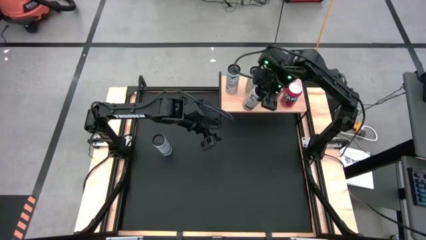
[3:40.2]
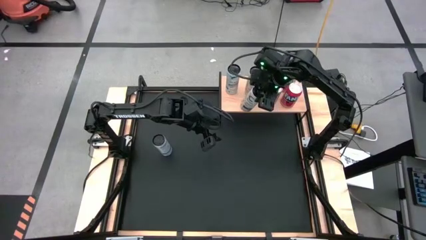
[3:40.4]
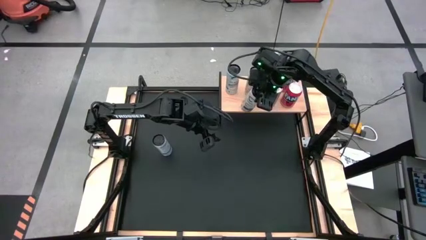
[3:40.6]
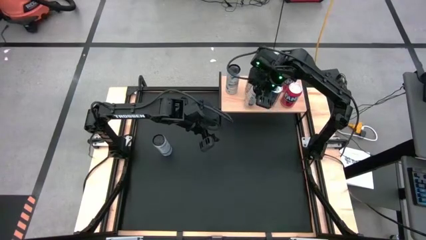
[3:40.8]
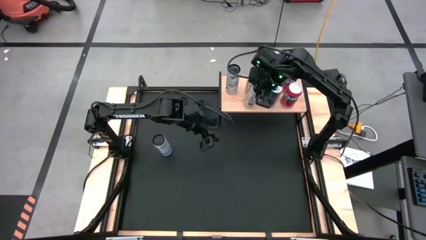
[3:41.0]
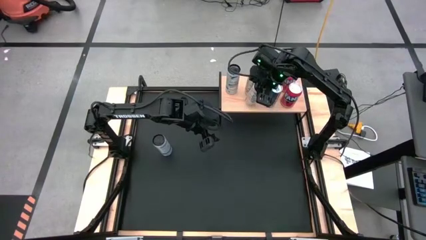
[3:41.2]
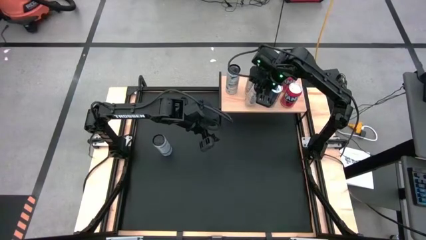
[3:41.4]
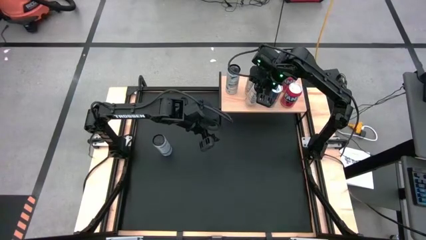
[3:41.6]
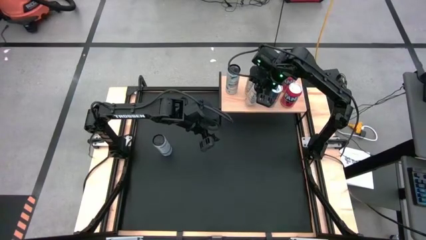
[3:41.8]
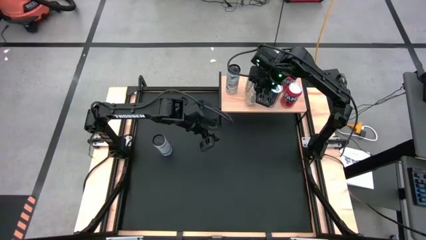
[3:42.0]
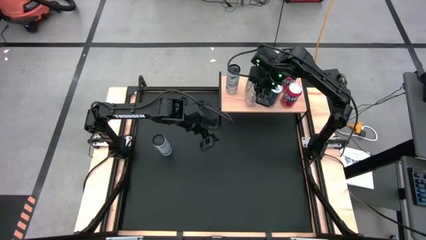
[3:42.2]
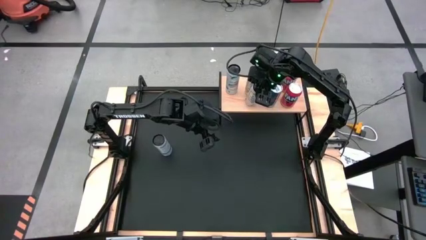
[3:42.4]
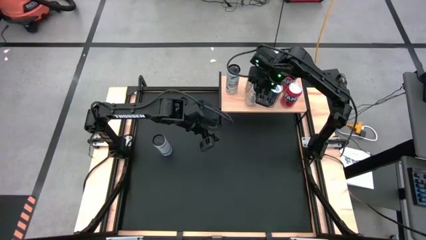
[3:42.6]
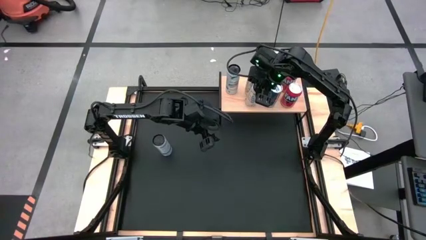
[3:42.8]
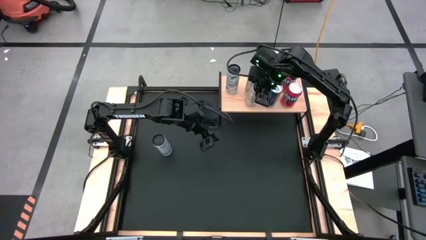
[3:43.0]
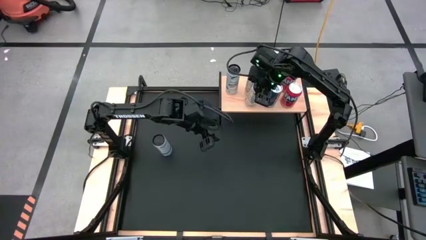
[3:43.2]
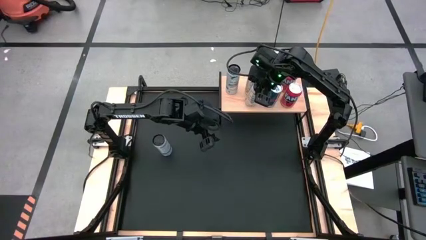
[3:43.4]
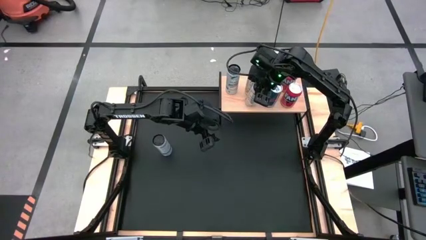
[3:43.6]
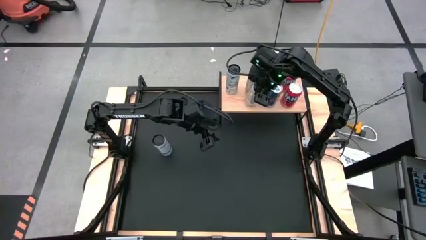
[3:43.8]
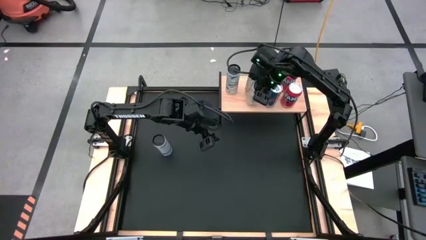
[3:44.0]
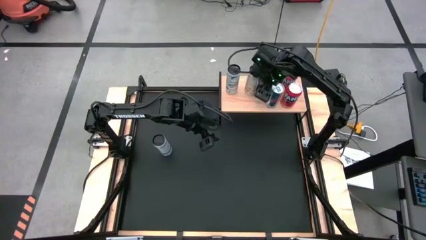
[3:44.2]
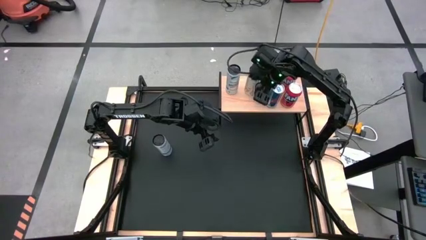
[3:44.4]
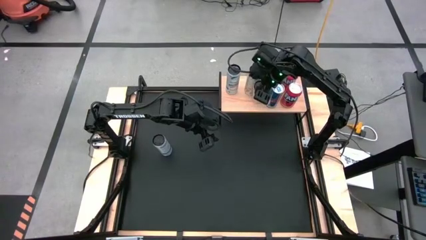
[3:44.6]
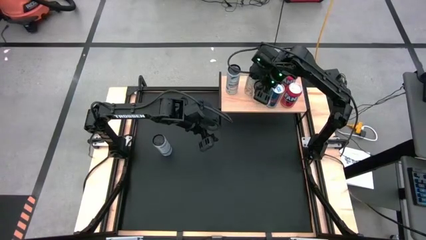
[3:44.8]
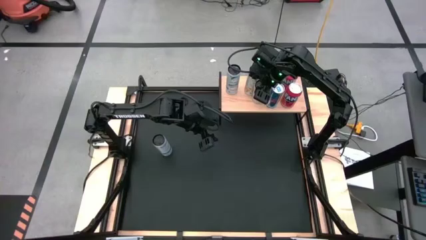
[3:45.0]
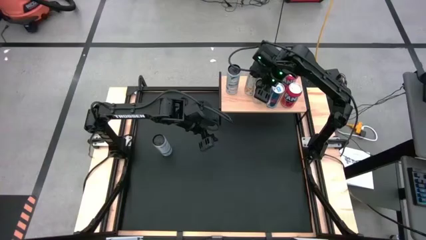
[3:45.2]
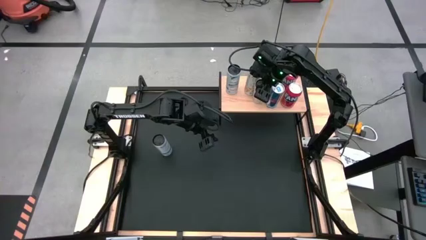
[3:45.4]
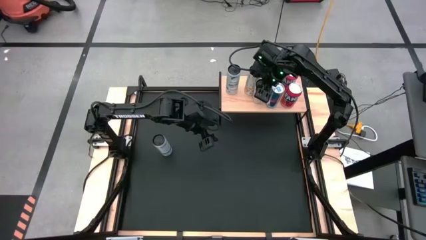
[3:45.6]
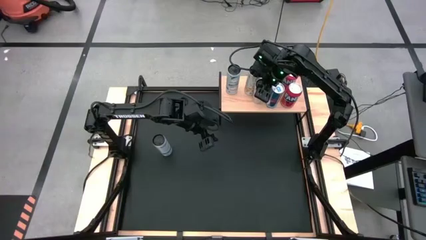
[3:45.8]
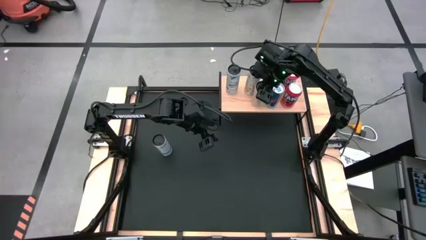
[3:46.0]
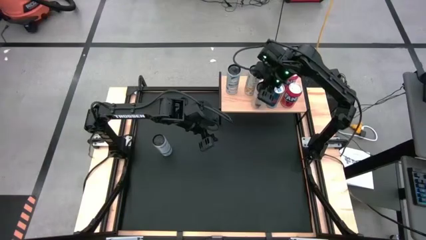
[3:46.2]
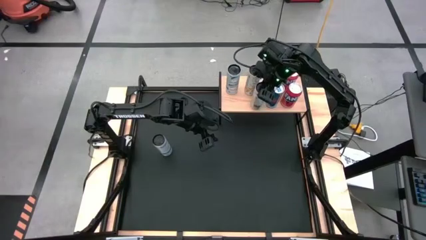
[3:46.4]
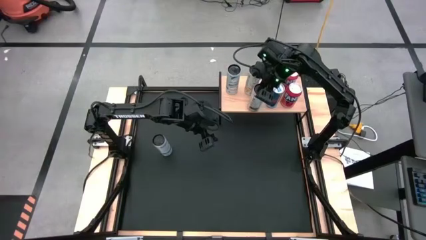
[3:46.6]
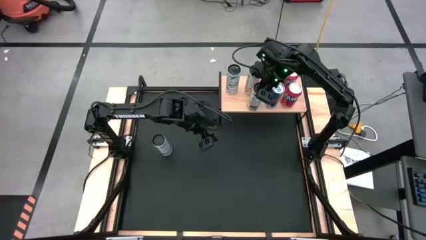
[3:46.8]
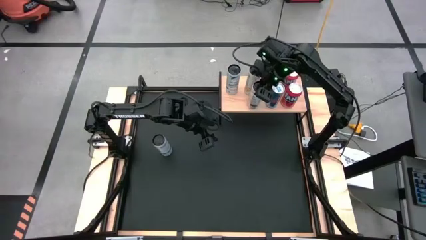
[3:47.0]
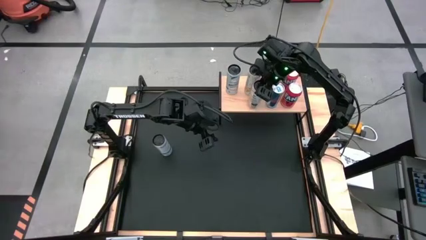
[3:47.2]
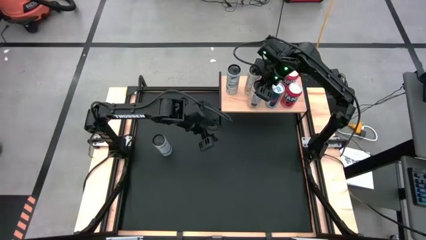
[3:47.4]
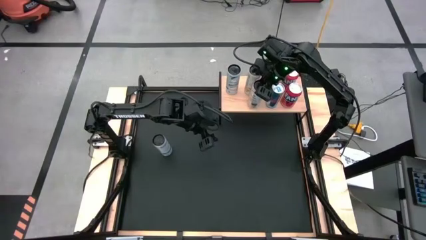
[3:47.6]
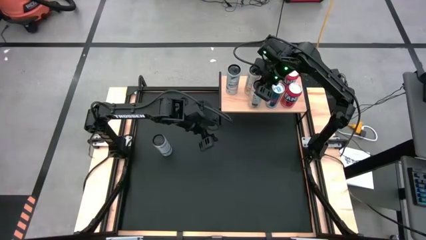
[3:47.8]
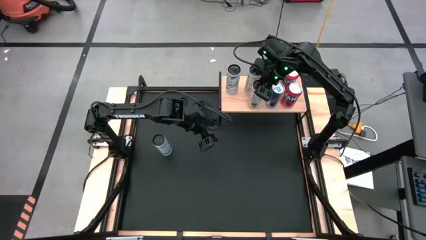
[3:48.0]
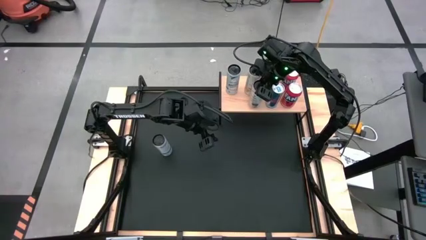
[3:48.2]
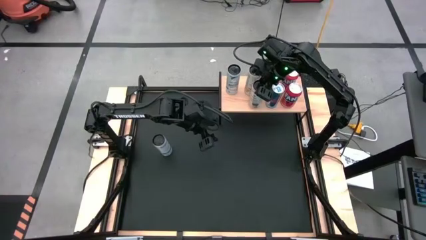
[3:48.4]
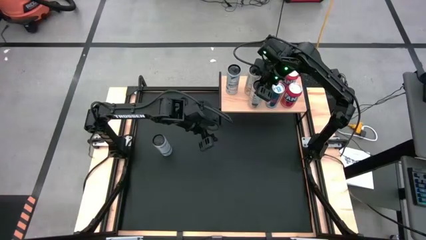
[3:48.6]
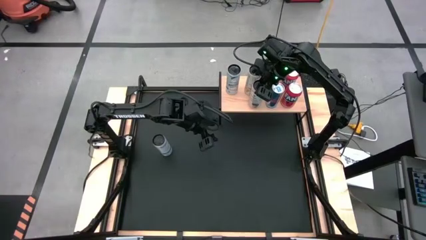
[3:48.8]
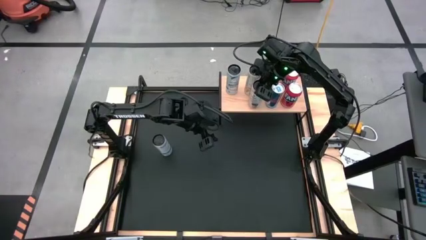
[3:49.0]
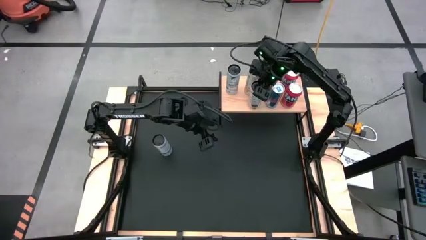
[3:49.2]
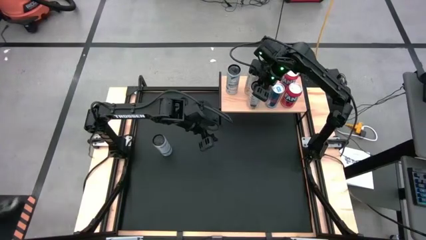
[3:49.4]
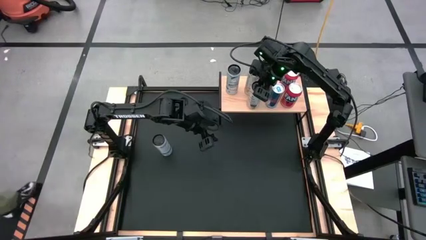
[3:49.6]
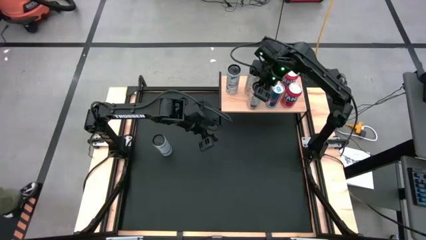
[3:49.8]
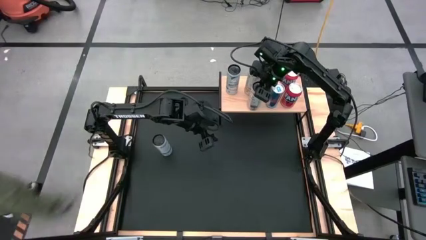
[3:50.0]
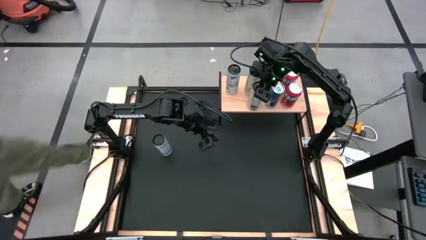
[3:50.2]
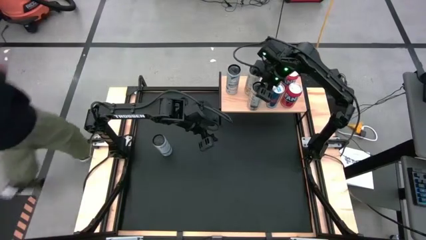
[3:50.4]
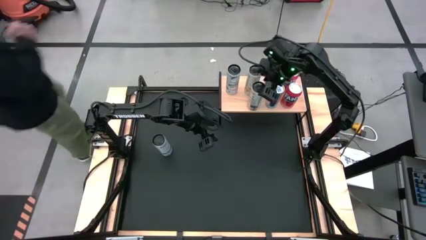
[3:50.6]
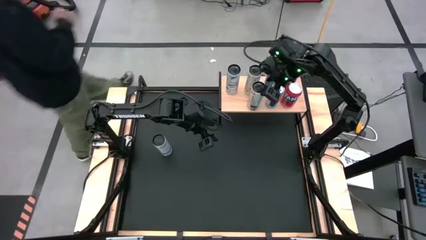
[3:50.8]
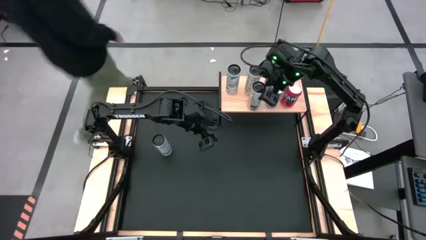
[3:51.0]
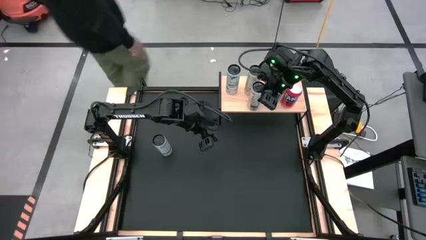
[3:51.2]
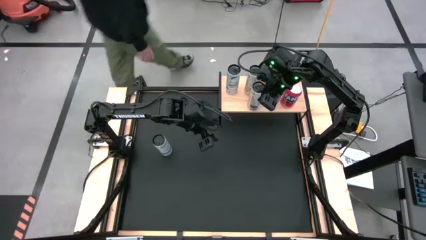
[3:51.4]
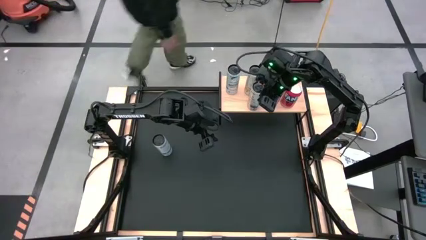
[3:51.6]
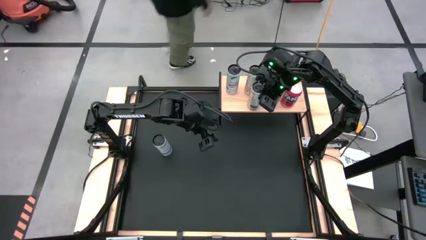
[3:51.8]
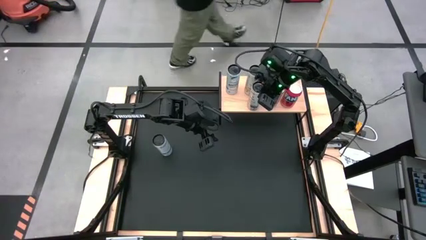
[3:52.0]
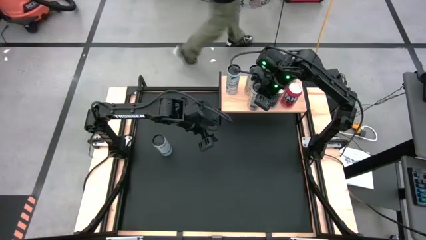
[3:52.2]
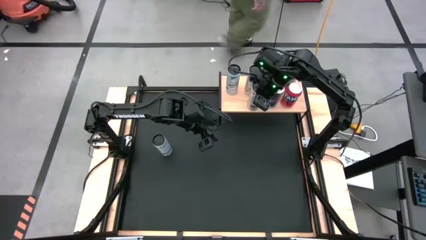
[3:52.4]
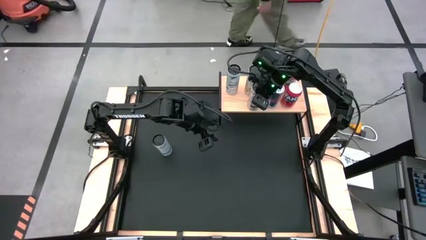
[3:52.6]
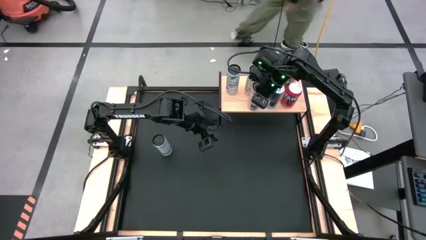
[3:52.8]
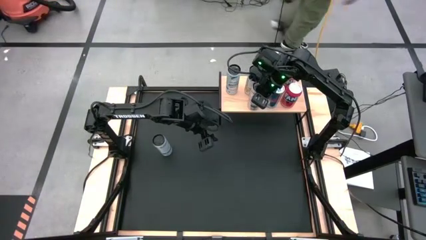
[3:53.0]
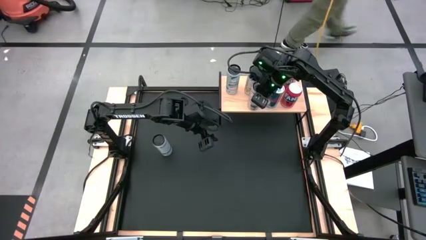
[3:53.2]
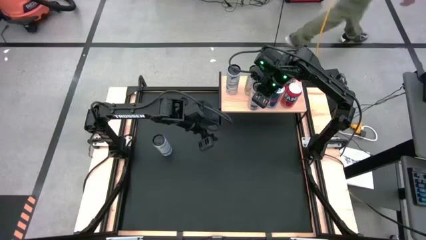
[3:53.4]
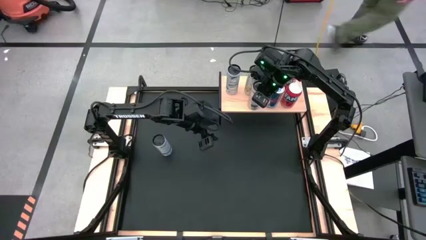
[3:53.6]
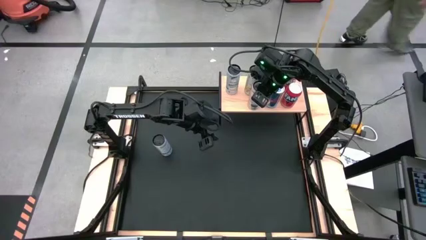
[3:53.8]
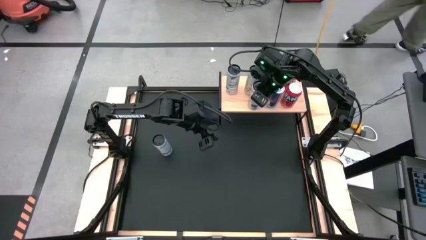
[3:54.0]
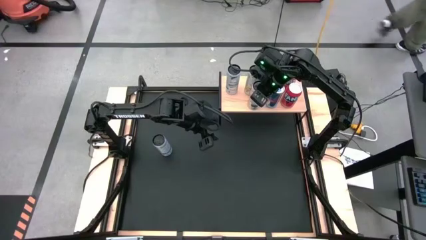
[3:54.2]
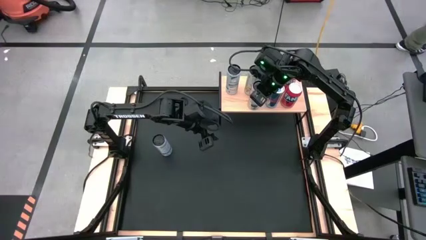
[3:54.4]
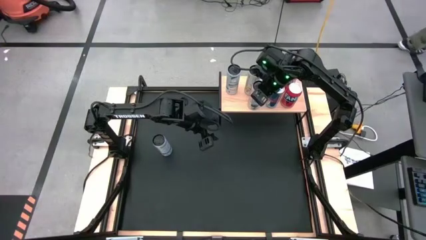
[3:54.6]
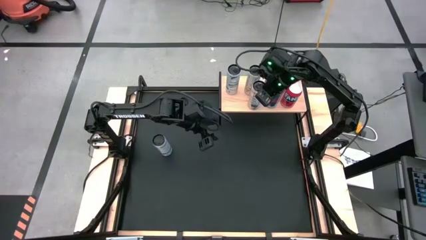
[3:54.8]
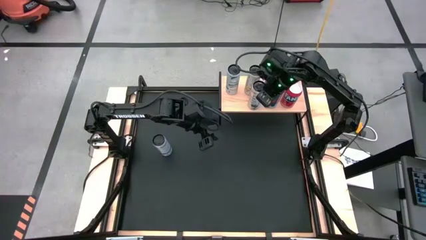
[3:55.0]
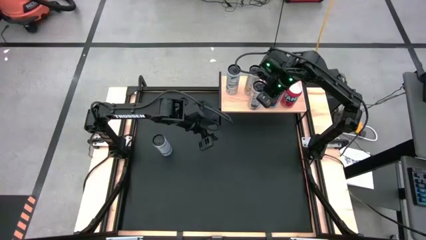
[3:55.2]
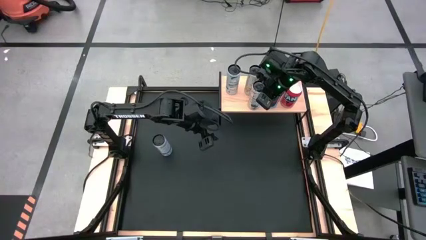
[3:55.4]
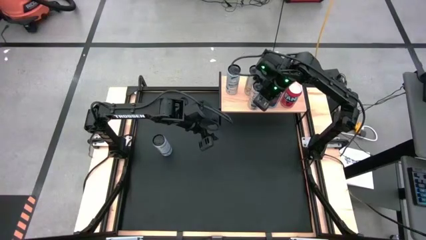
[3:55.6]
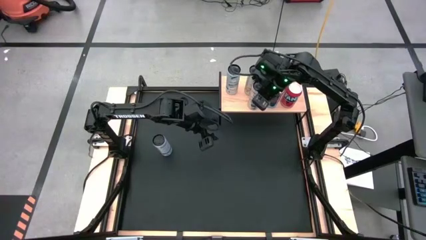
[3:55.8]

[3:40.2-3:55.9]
Task: Place canned beverage on shelf
Put the white yellow soda can on the shelf aligned with the white yellow soda can
